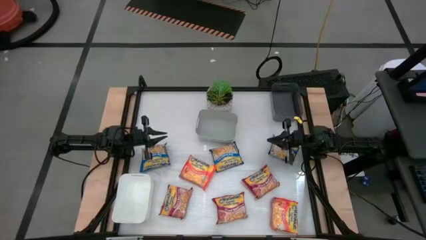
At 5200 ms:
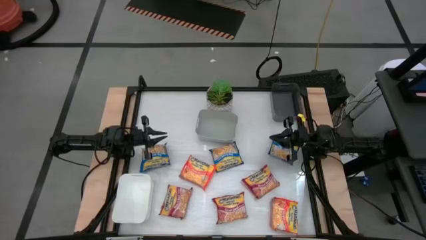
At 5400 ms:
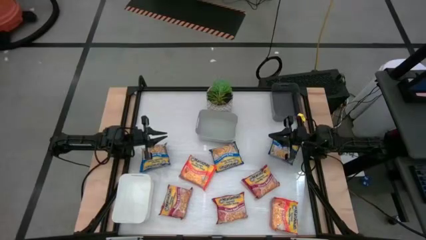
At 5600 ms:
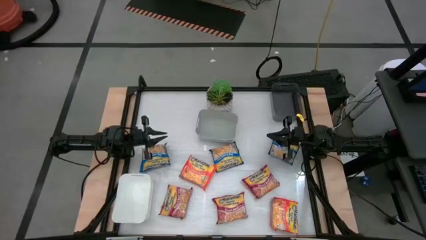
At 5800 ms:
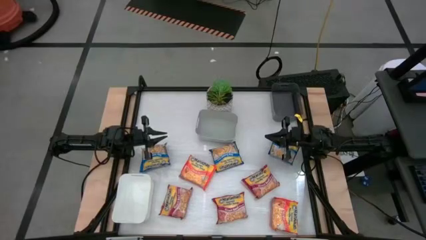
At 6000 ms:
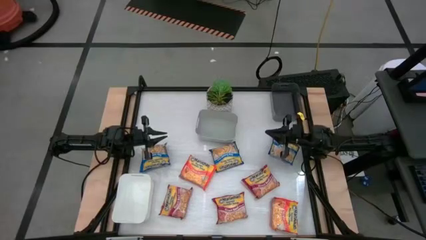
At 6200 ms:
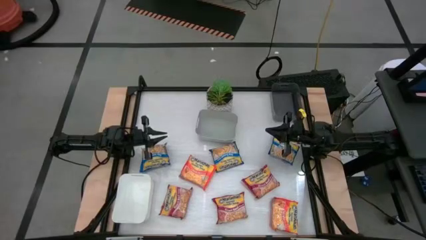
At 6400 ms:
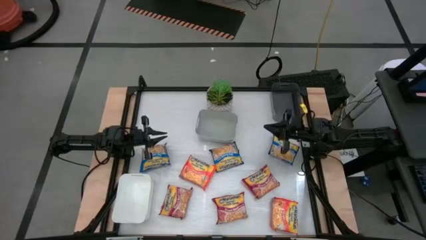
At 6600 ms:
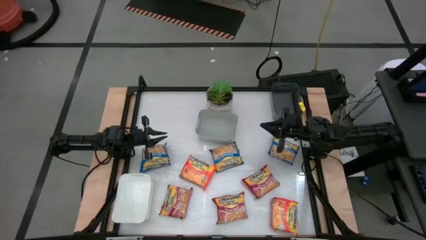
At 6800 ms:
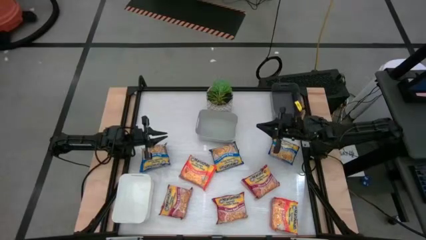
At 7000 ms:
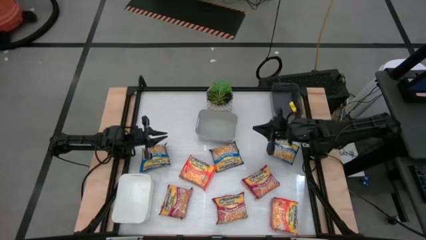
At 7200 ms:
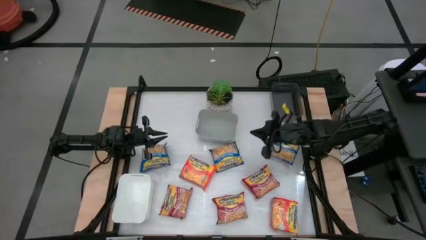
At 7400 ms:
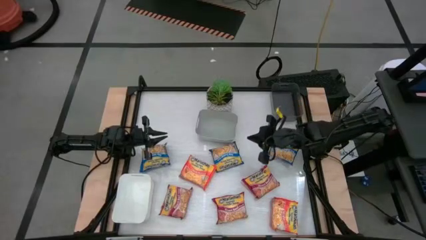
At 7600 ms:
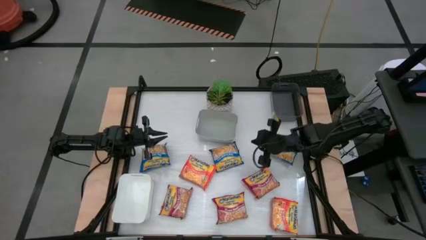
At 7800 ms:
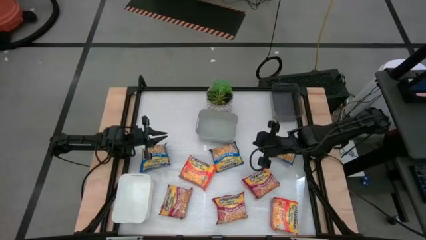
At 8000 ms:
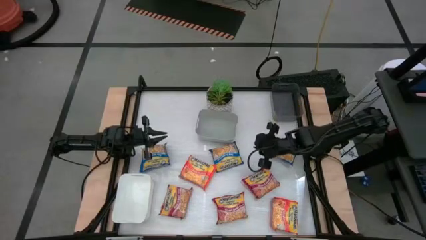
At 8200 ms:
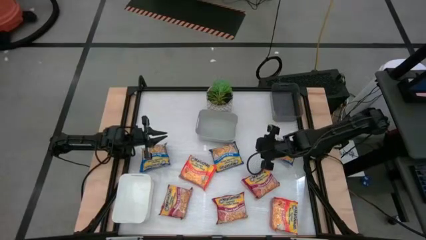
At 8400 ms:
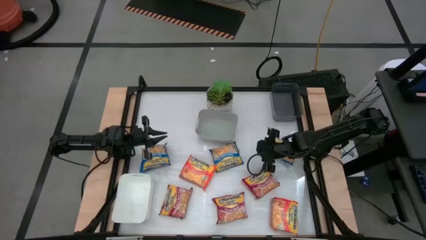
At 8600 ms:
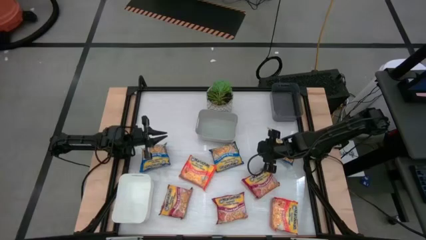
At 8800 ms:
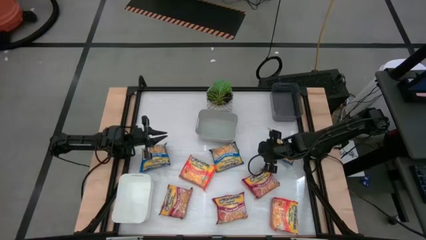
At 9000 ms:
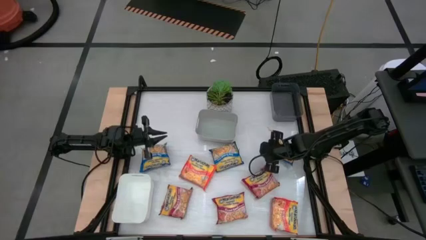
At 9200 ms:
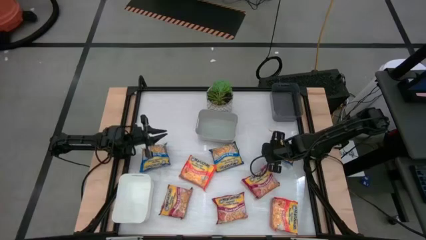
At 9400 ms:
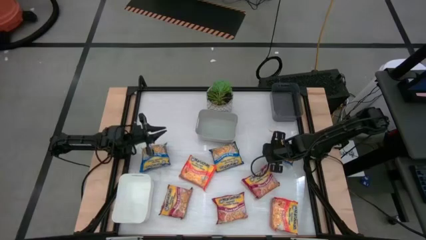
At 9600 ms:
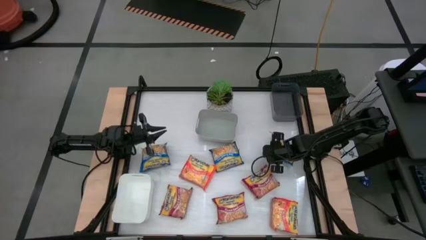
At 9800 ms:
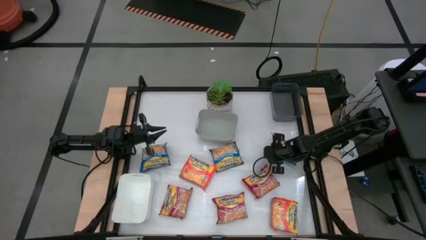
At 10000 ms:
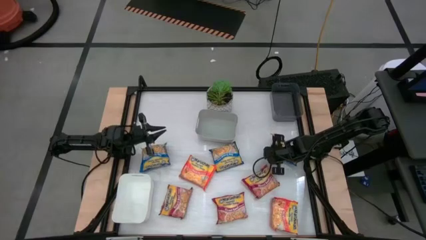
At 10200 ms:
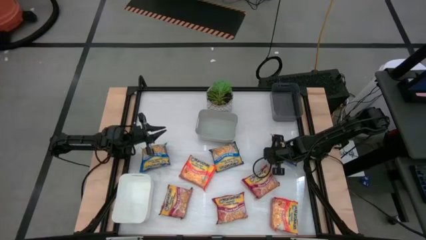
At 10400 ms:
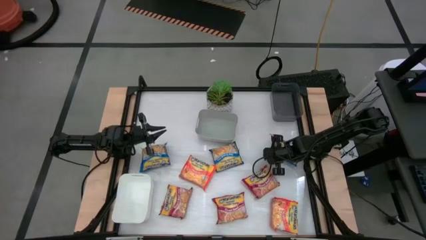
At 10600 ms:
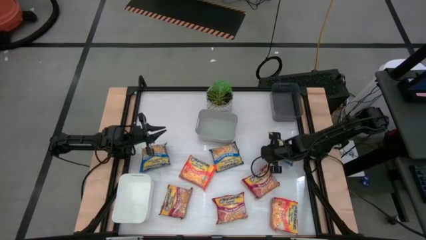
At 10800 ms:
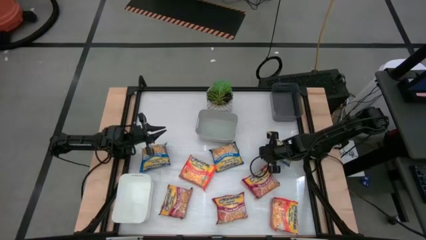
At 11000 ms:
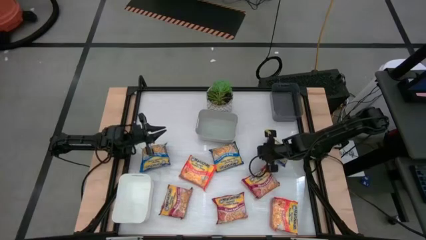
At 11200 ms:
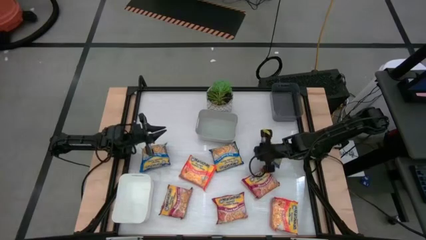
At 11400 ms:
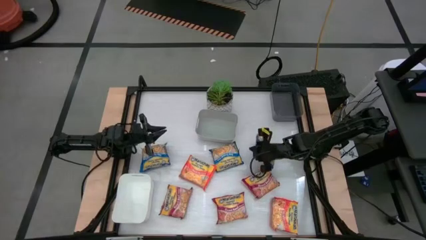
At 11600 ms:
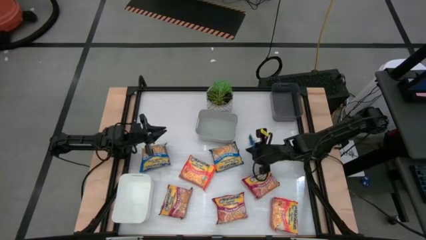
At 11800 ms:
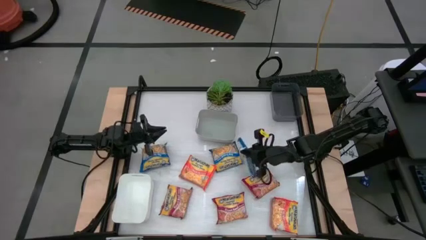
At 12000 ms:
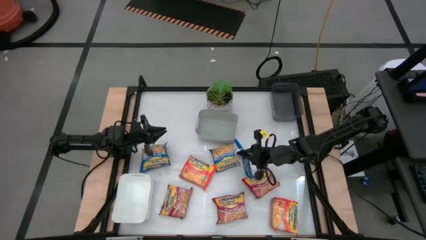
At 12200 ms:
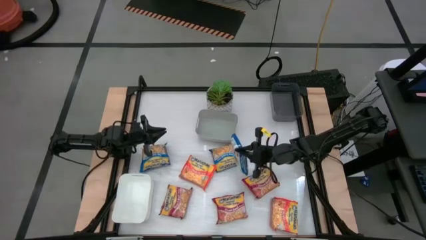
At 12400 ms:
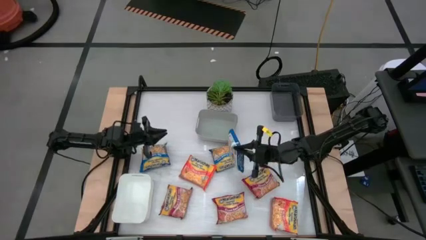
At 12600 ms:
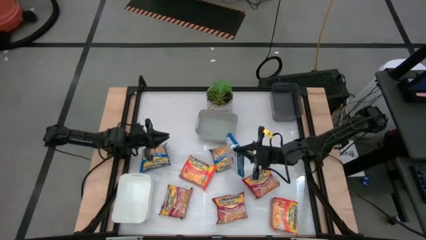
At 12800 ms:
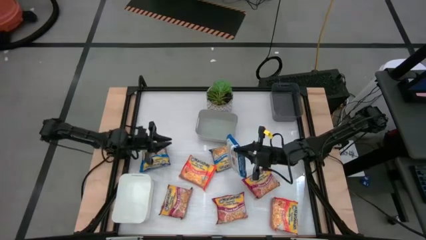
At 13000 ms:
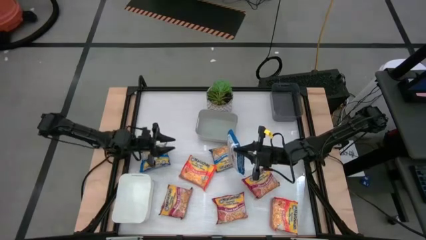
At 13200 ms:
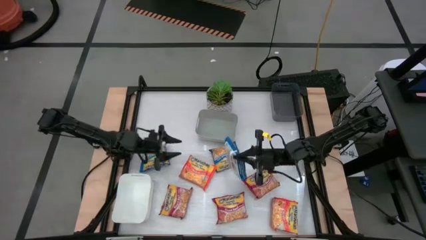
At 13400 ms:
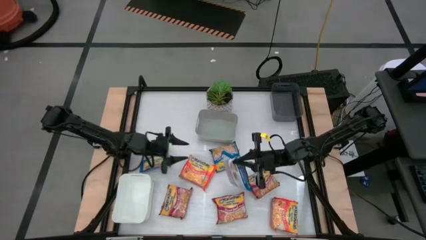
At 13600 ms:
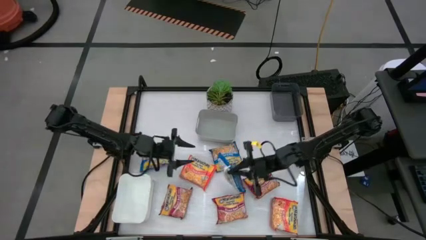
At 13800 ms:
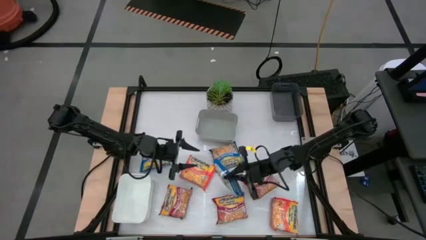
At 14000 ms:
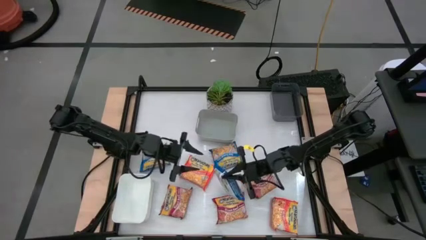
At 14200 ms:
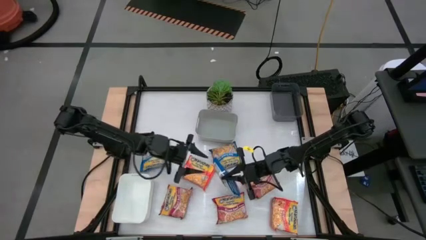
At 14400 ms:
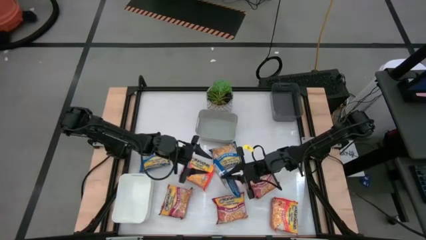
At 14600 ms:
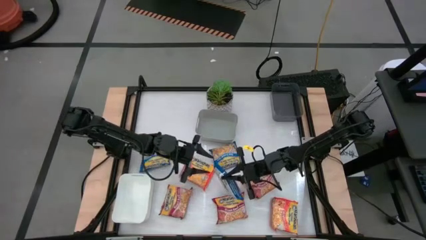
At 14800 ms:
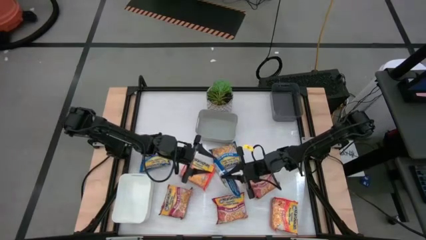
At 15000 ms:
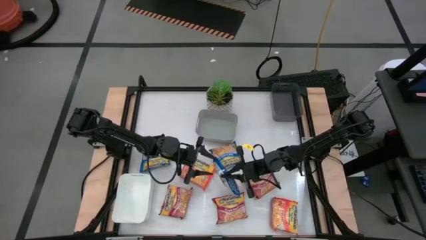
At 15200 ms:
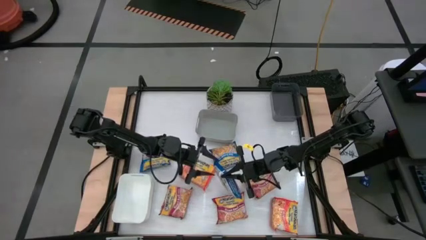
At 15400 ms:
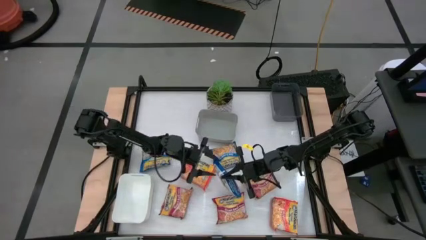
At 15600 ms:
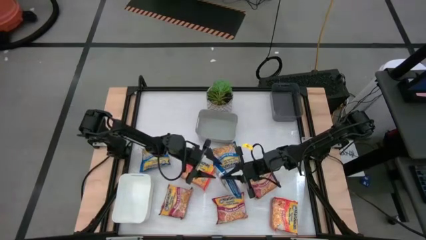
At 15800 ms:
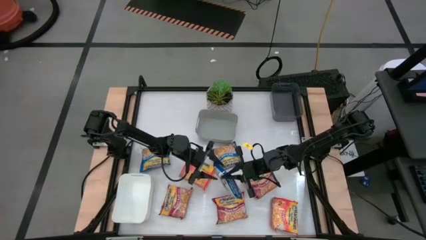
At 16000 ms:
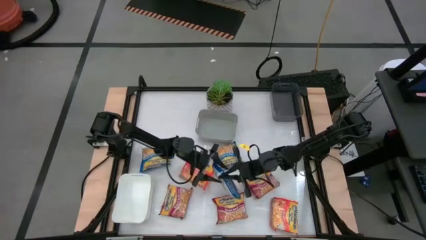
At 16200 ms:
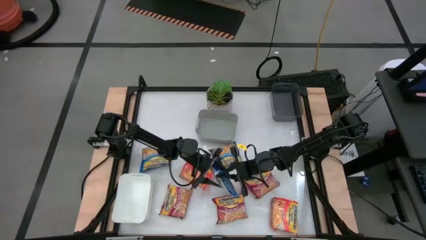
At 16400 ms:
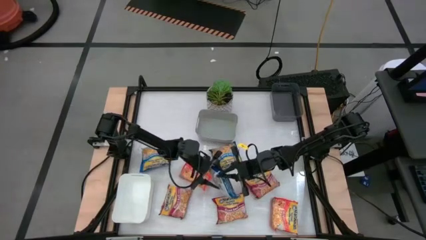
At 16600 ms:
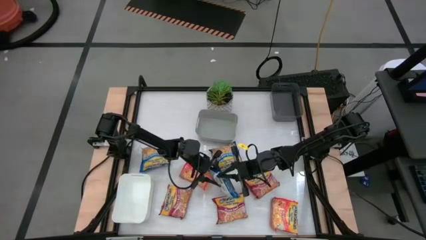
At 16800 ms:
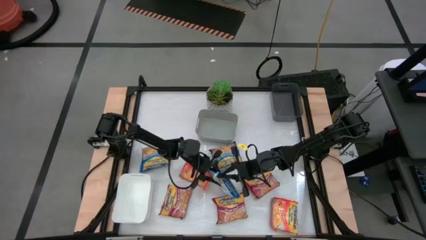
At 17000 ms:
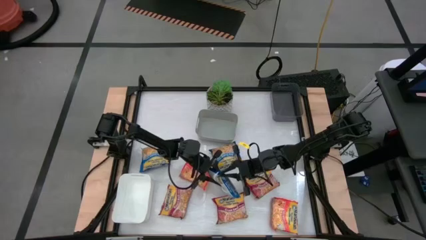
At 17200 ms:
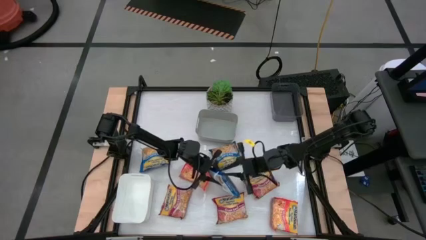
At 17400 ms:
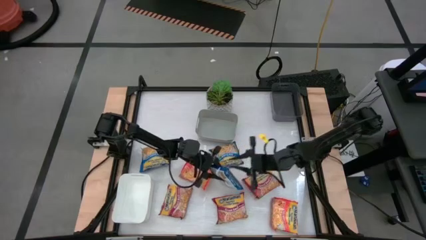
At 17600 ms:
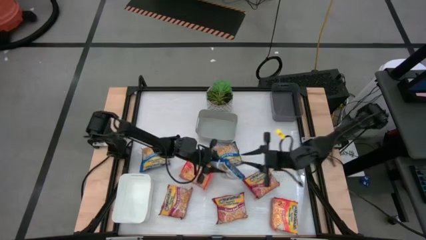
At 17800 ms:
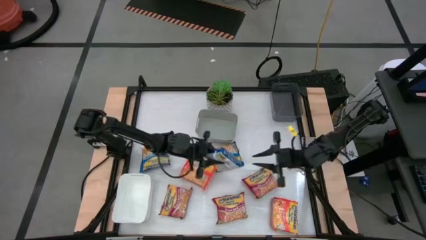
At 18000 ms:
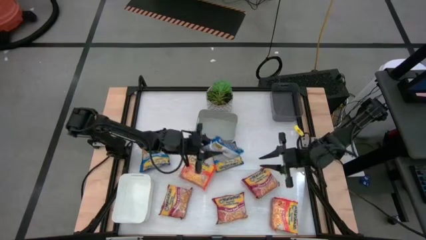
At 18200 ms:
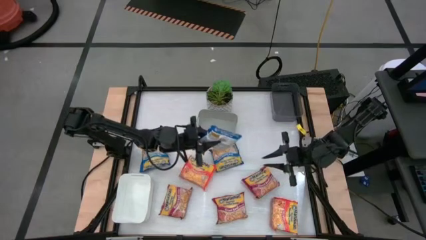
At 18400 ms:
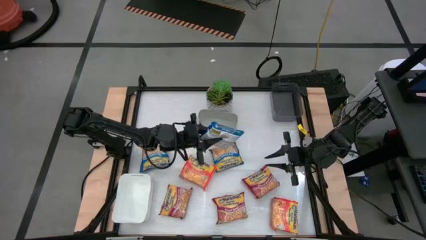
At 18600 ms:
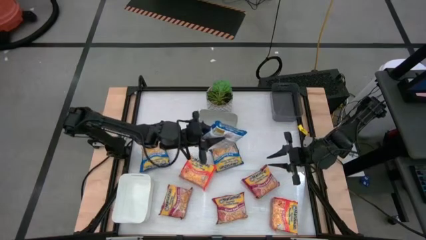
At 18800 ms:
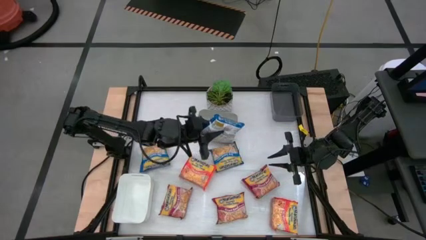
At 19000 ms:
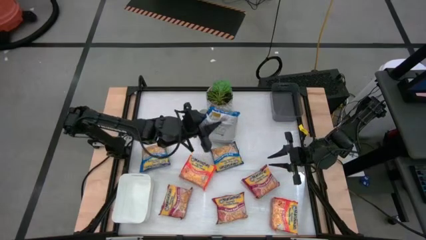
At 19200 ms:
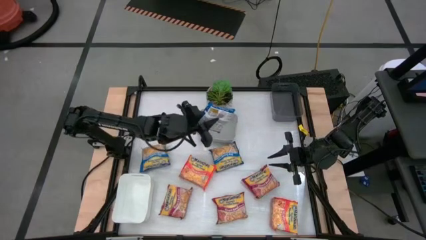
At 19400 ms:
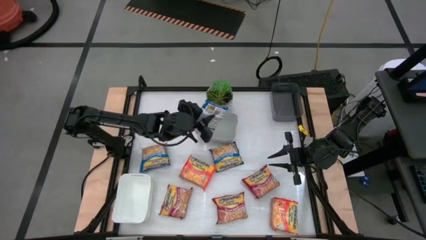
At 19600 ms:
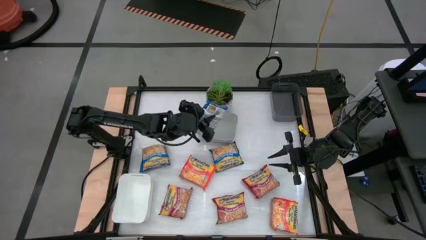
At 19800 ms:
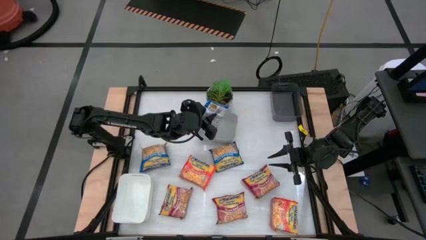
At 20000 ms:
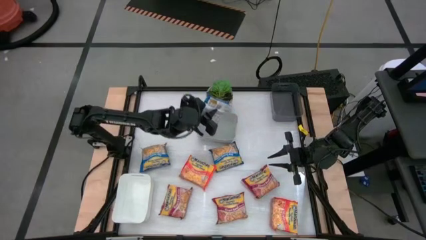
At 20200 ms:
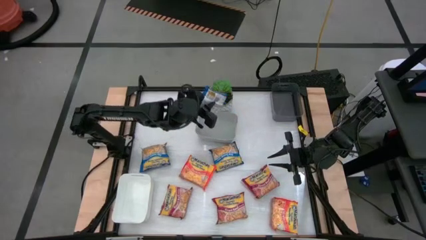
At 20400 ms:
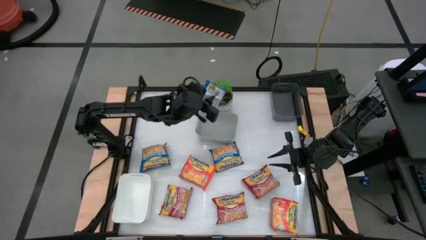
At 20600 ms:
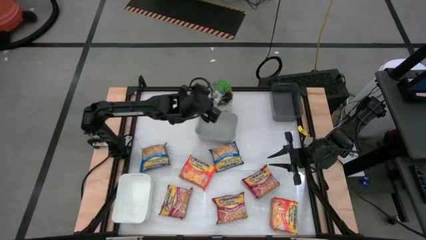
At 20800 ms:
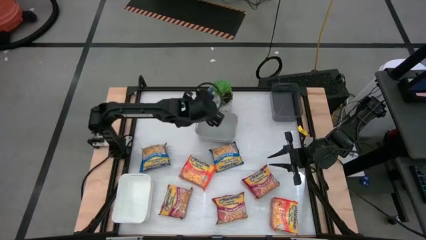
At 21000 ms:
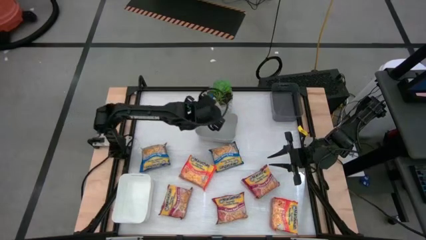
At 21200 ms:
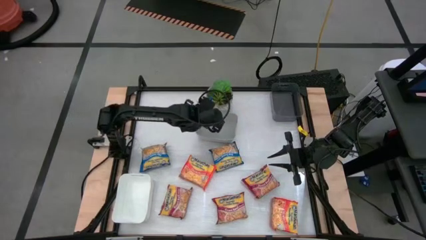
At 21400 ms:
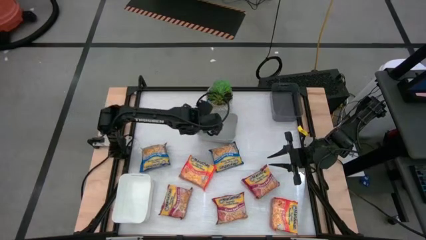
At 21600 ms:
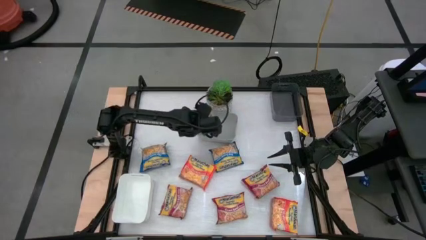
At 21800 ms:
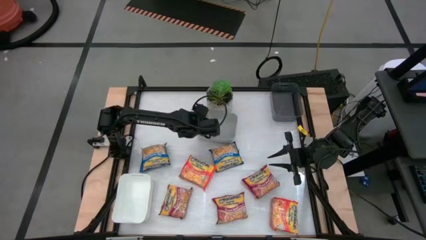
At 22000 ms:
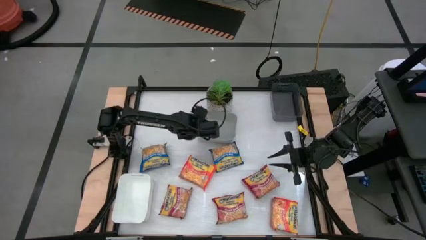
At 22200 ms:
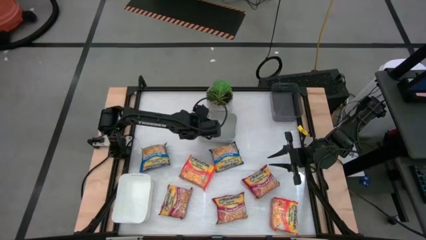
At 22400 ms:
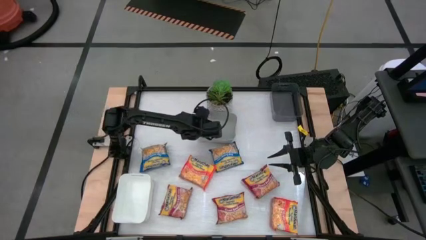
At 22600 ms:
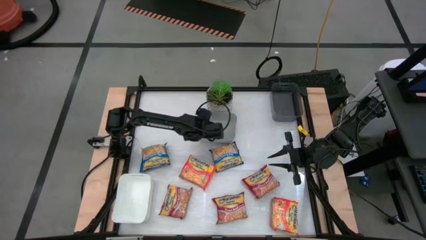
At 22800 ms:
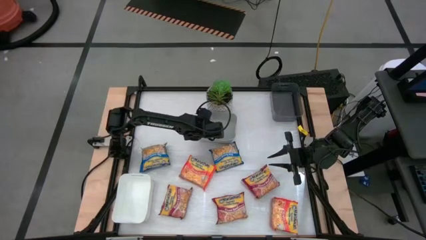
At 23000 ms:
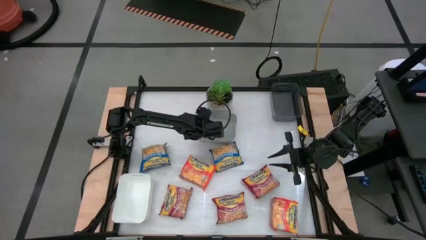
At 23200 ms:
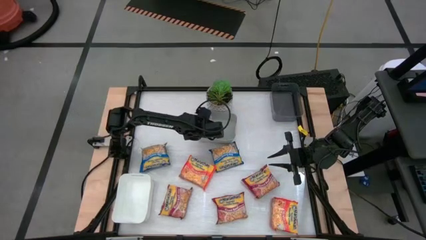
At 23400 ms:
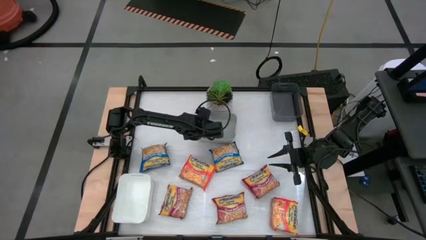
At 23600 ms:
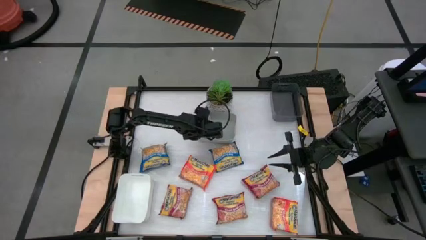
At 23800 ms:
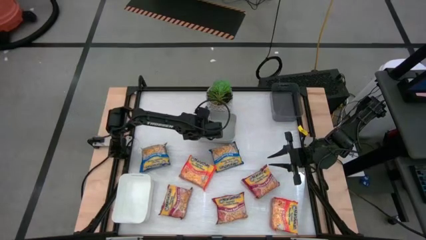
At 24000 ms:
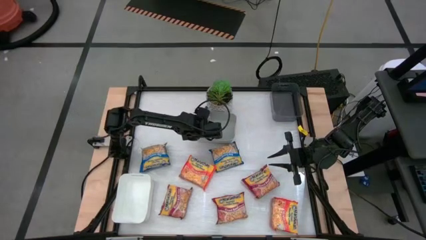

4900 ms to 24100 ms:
Task: Sort Maruchan noodles
Put the right blue noodle pack into the gray bin
